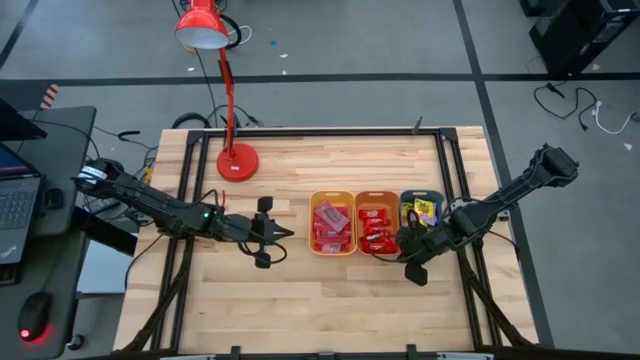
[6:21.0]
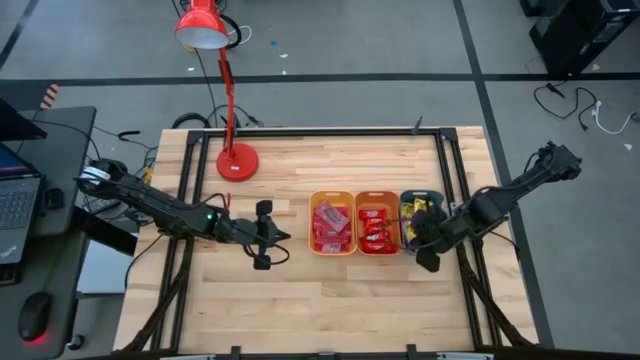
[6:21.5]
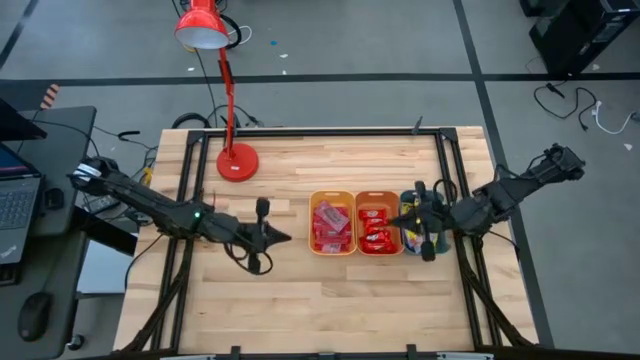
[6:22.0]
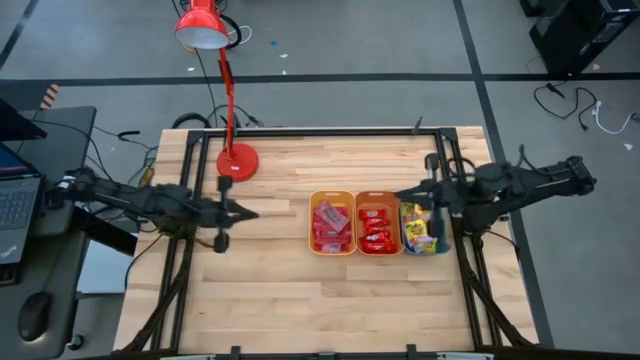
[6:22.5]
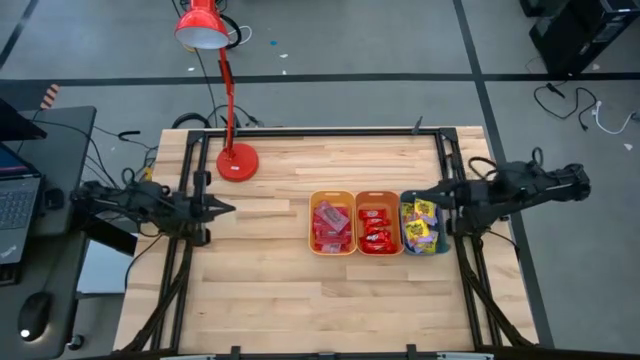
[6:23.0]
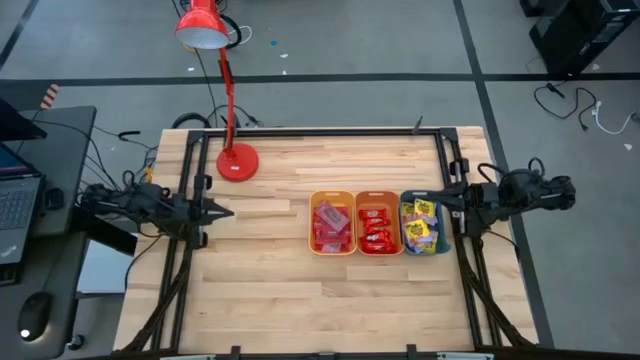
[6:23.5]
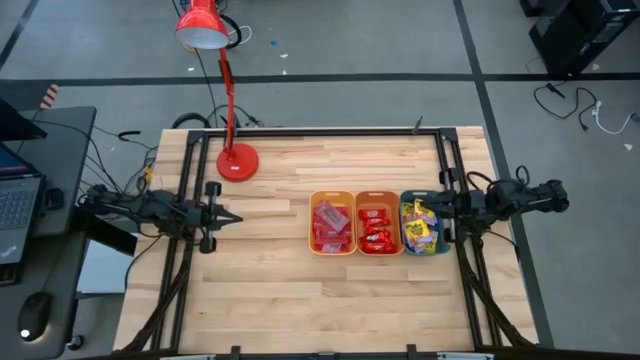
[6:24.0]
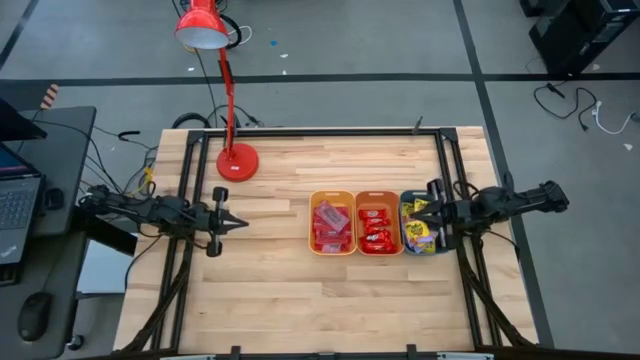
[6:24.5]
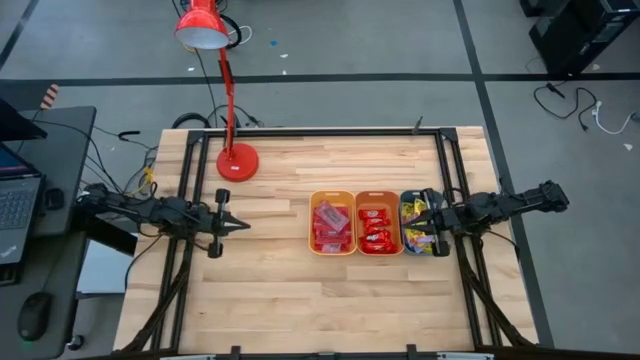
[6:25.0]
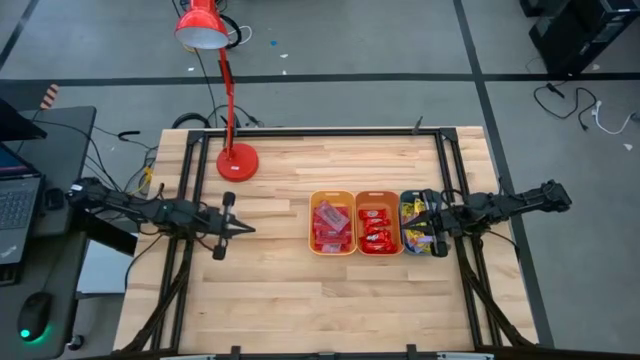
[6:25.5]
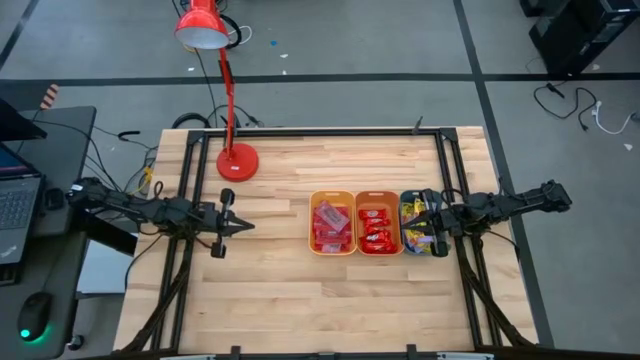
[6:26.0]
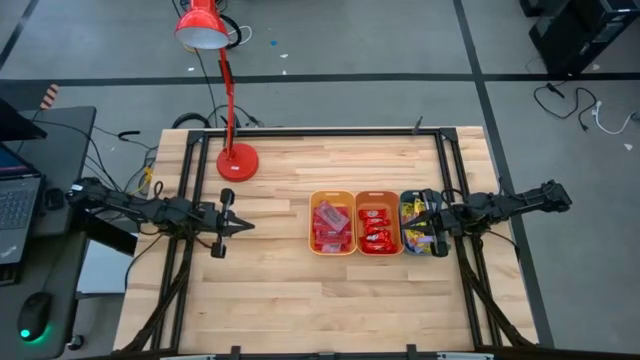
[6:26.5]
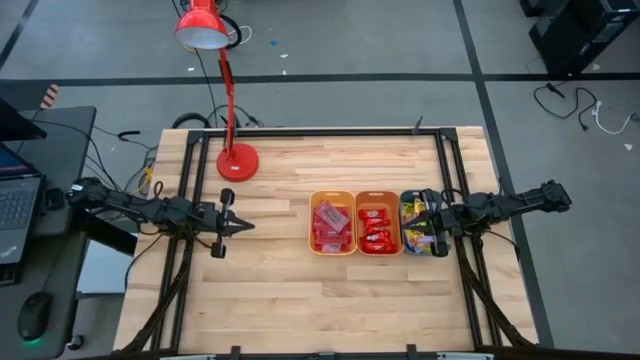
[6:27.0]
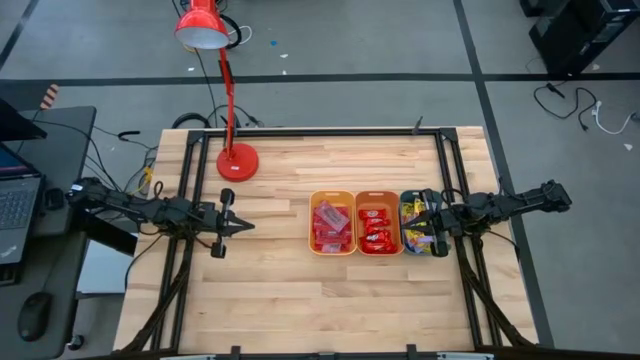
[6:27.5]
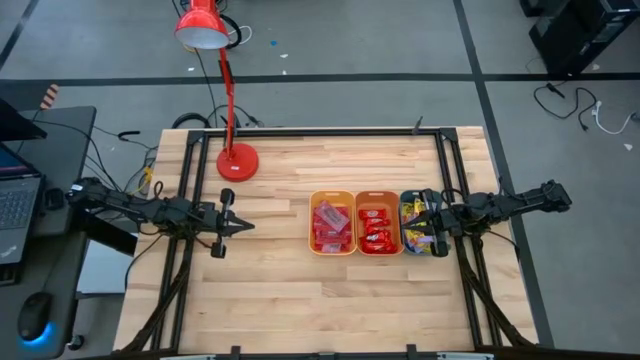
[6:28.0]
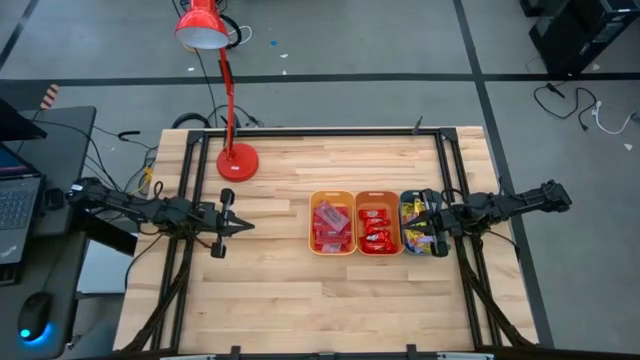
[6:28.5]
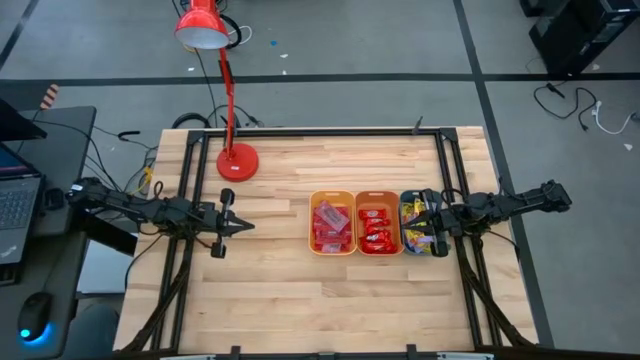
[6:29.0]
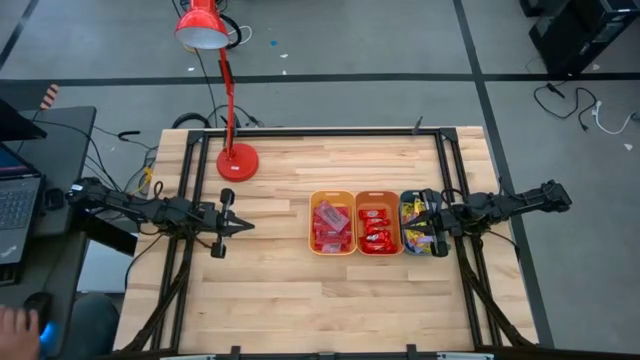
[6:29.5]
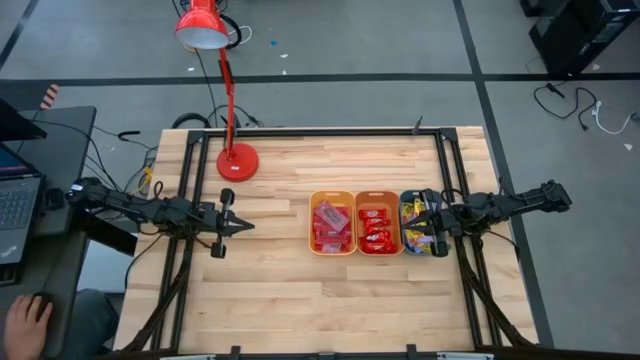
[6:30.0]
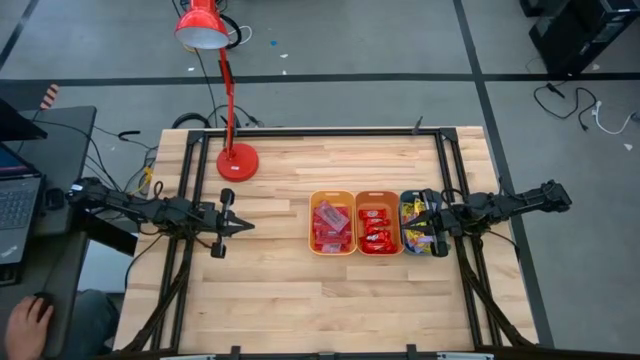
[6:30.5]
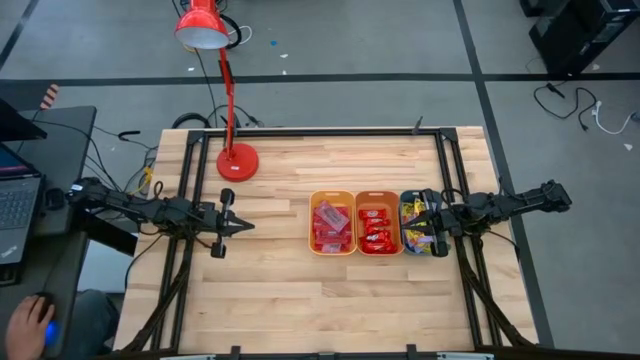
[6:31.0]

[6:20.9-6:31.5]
Task: Sort candy
Return to Home Position

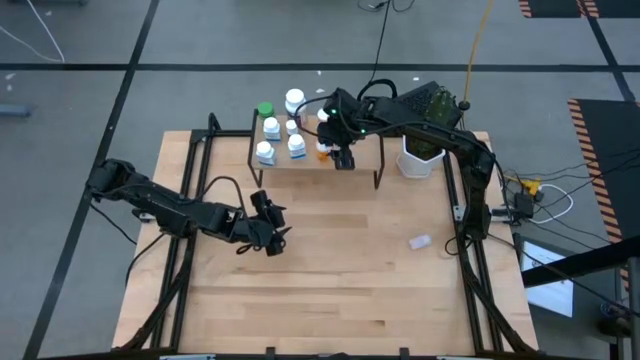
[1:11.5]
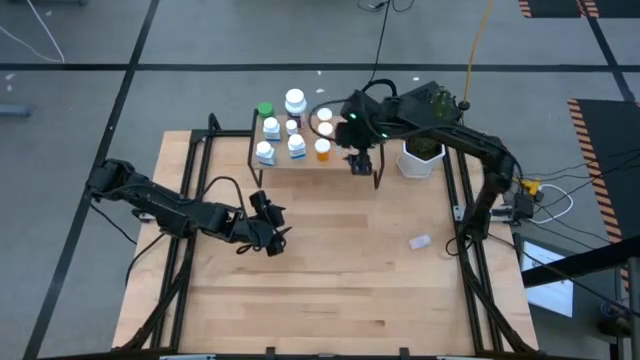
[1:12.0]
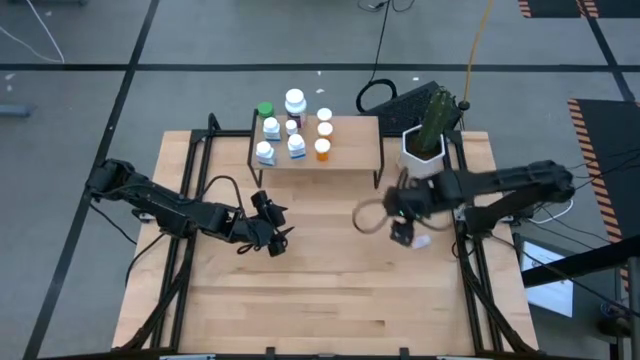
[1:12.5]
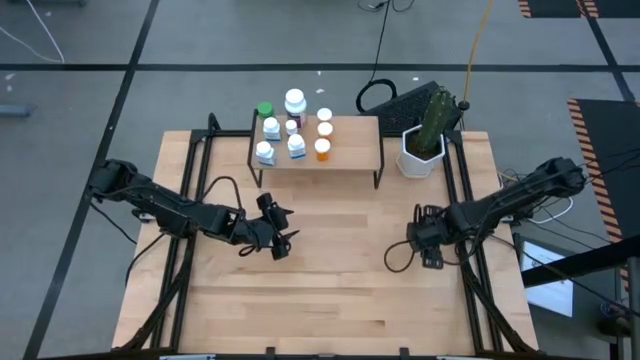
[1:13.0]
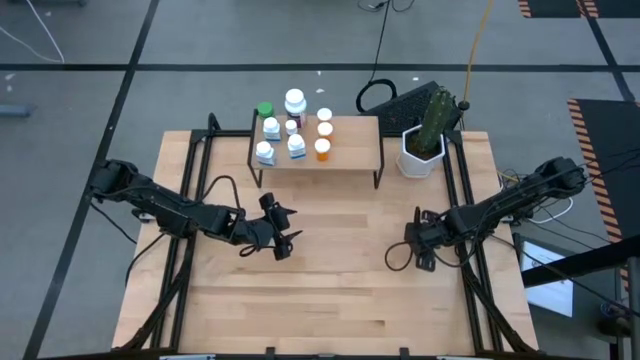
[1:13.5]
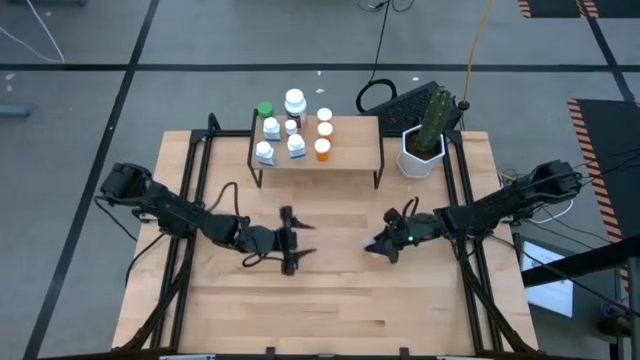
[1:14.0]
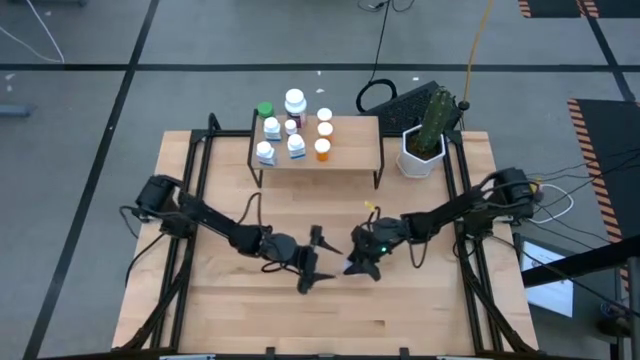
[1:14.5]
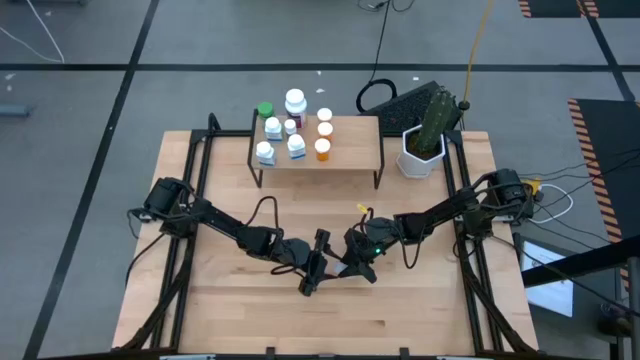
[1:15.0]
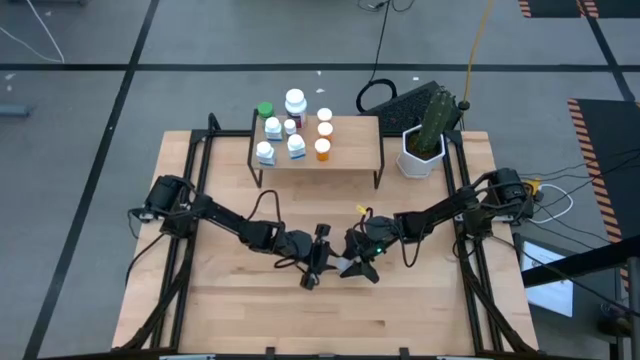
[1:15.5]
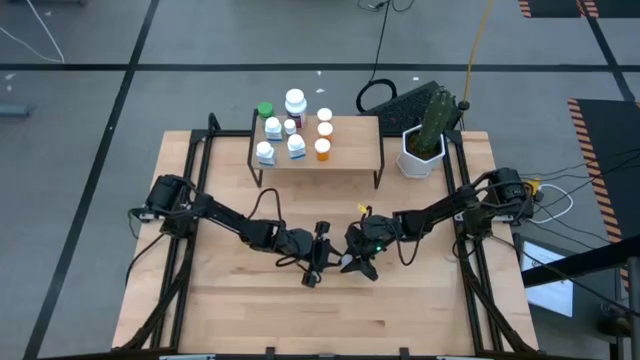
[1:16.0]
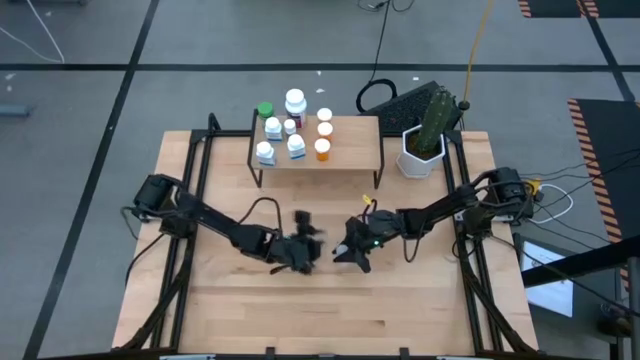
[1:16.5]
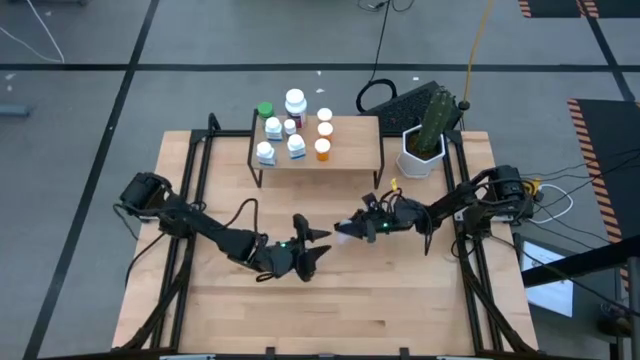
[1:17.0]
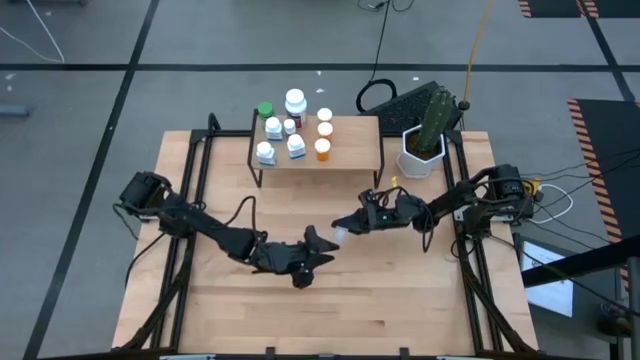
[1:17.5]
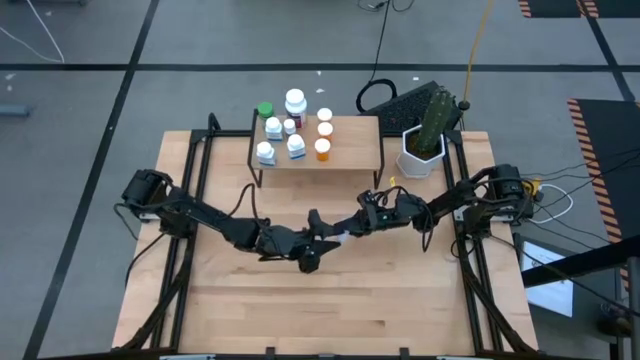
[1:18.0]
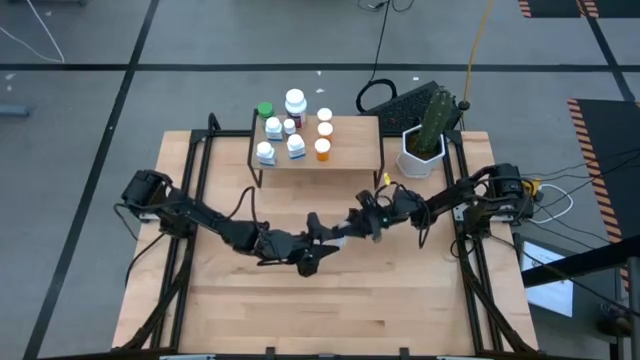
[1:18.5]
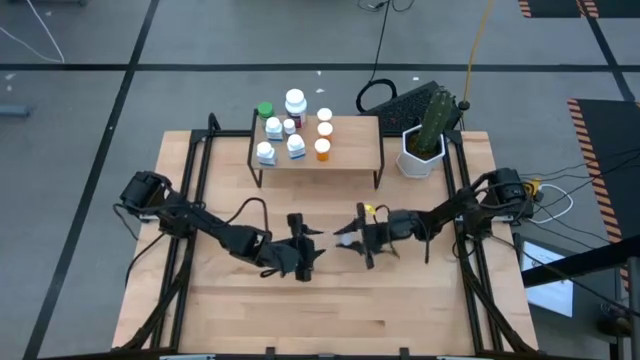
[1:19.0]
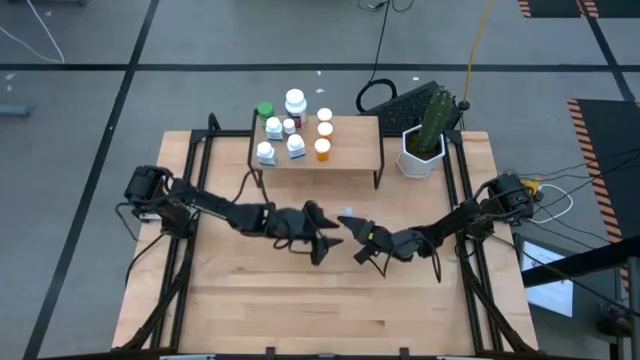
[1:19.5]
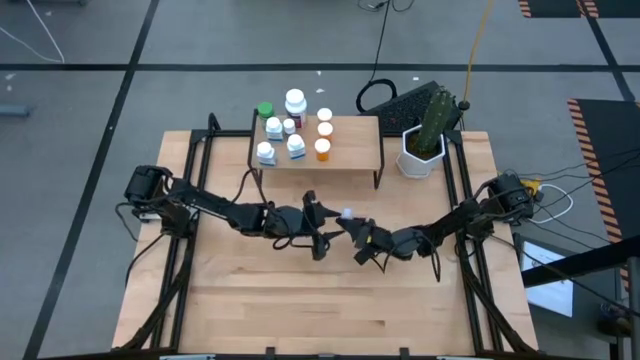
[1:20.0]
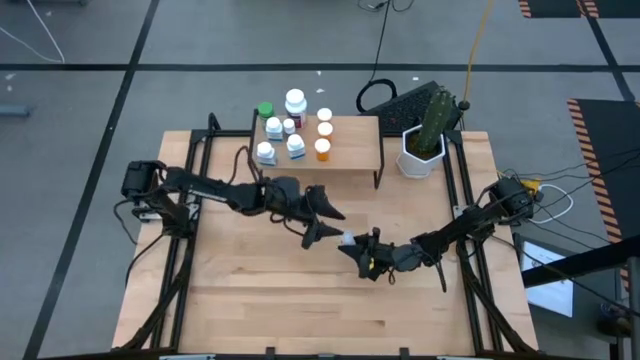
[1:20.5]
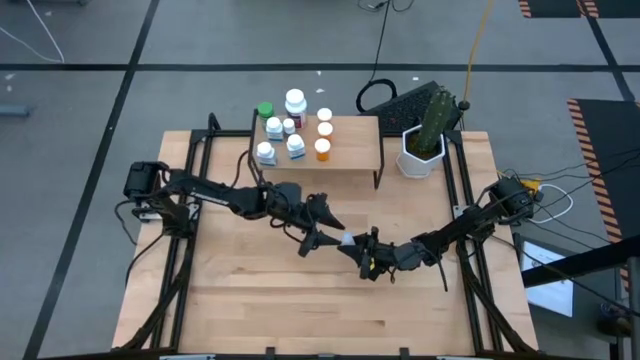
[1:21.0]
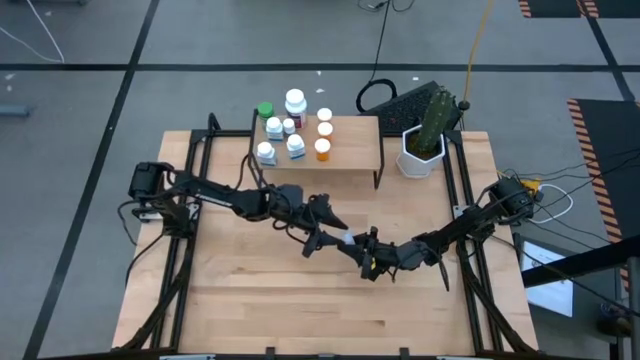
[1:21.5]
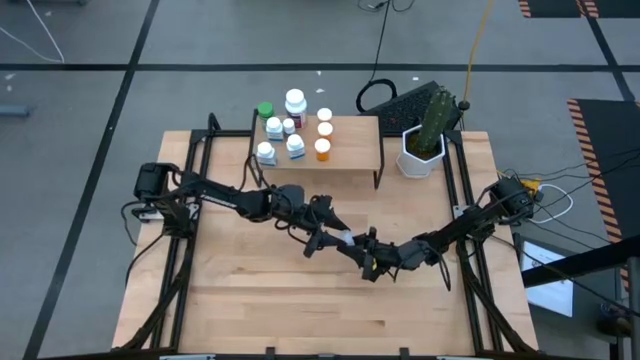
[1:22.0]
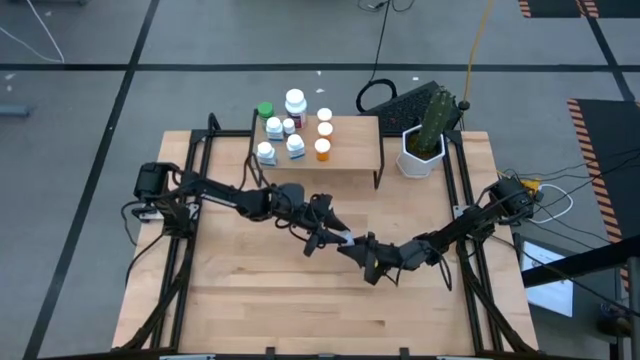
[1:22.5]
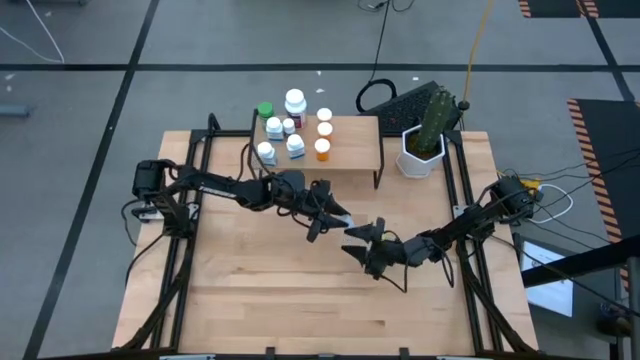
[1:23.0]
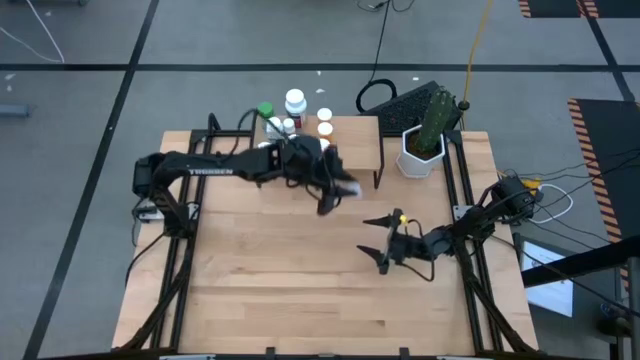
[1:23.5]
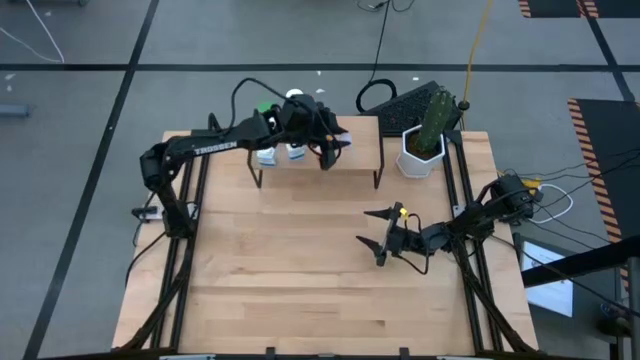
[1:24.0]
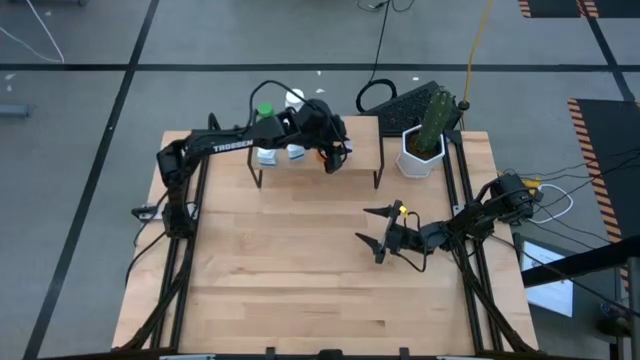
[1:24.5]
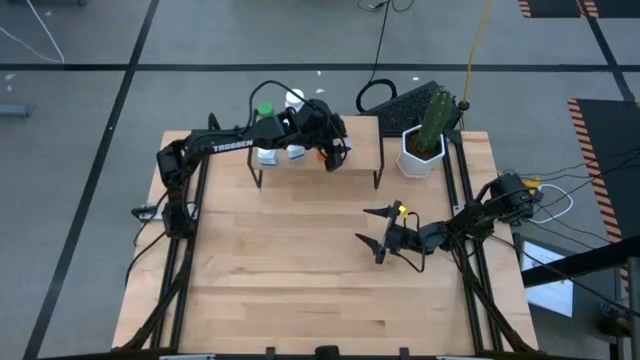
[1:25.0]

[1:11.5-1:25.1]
Task: Pick and place medicine bottles onto shelf by color
Put the transparent pill bottle on the shelf
